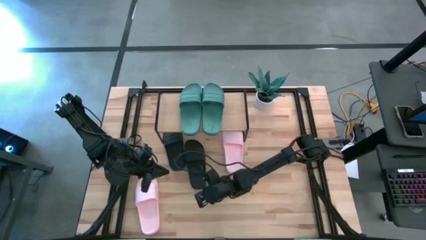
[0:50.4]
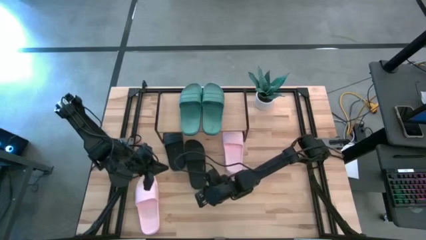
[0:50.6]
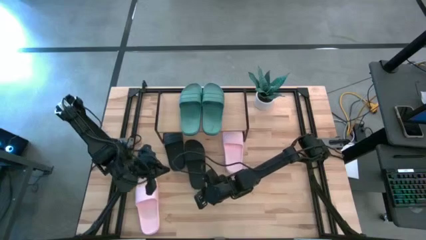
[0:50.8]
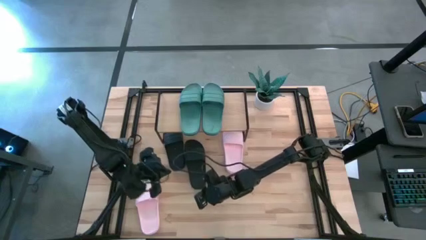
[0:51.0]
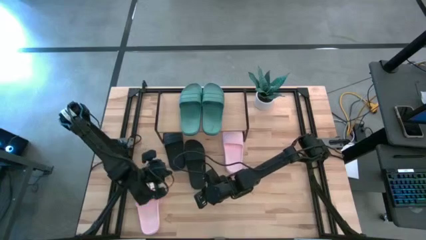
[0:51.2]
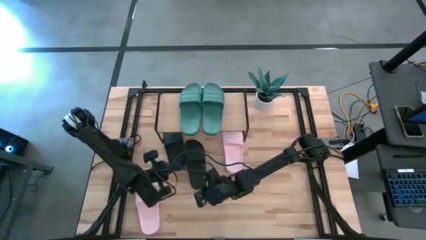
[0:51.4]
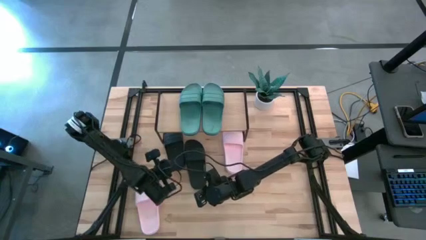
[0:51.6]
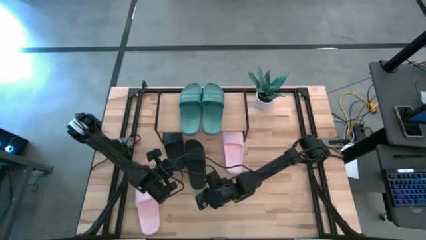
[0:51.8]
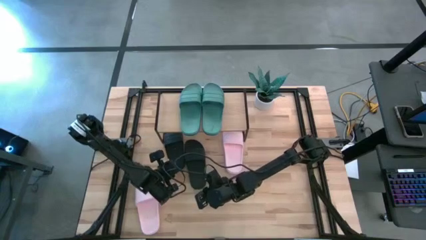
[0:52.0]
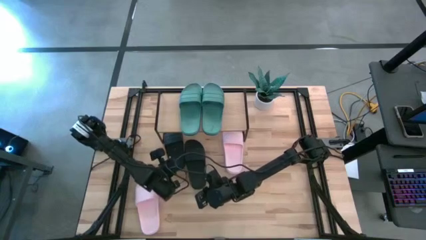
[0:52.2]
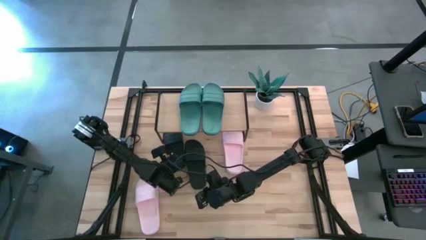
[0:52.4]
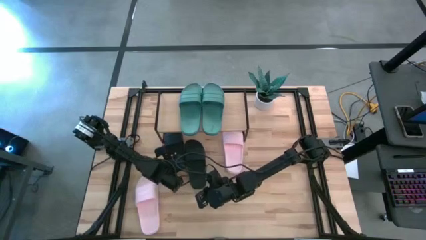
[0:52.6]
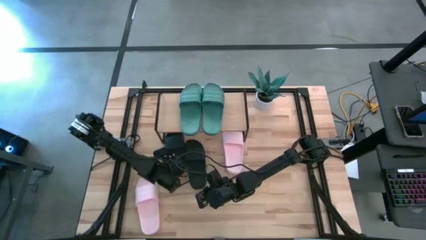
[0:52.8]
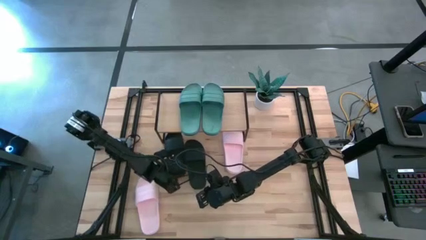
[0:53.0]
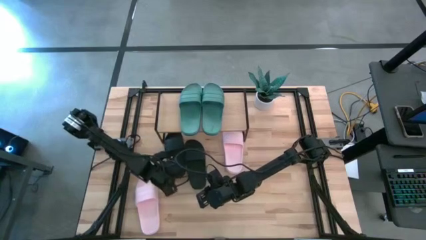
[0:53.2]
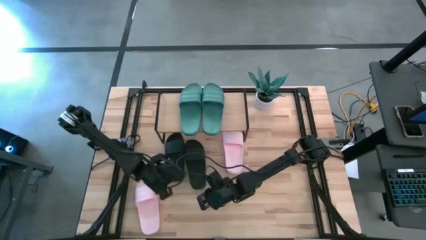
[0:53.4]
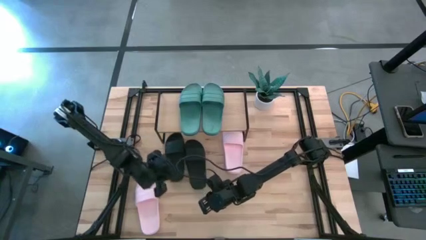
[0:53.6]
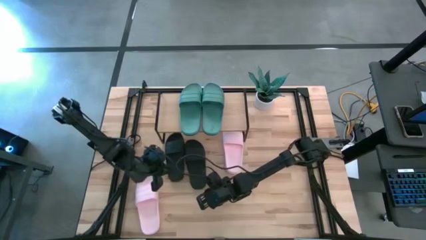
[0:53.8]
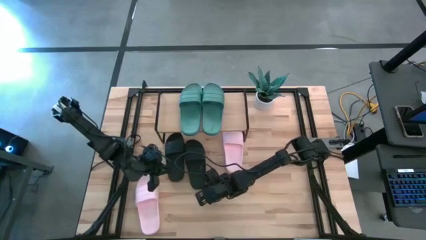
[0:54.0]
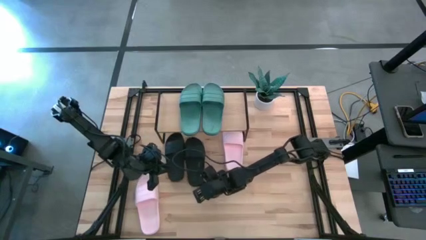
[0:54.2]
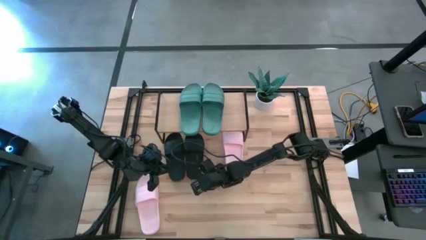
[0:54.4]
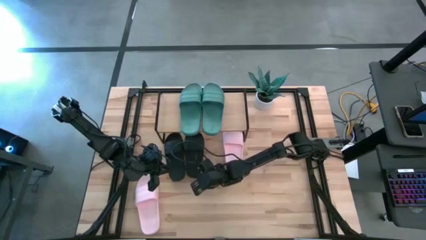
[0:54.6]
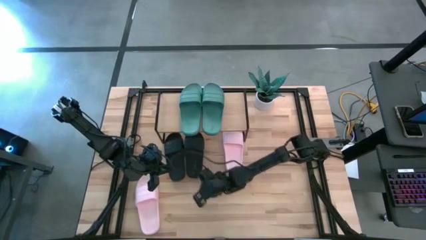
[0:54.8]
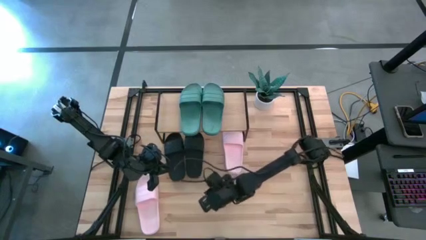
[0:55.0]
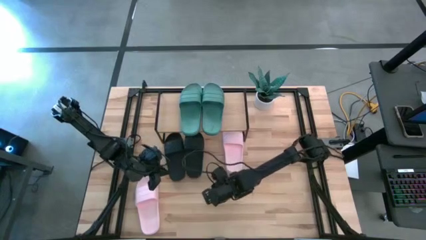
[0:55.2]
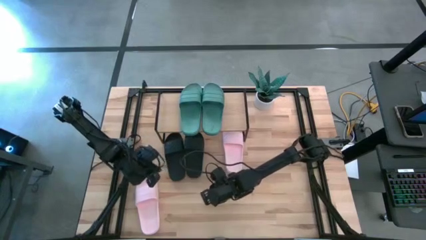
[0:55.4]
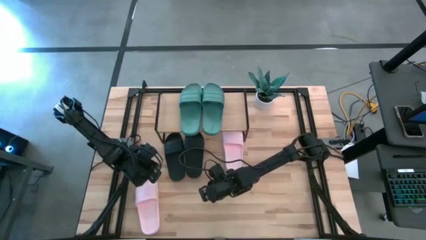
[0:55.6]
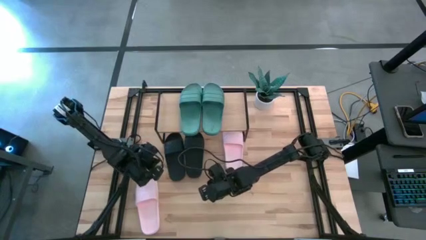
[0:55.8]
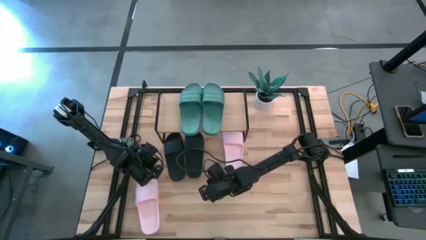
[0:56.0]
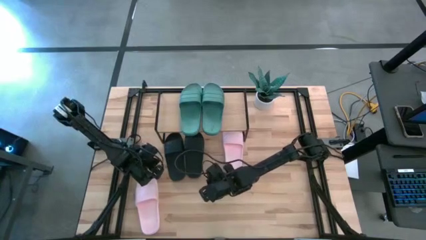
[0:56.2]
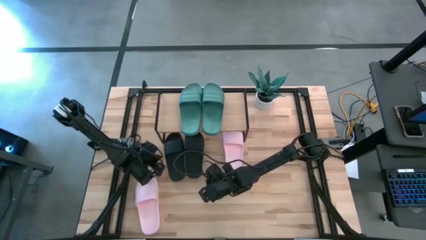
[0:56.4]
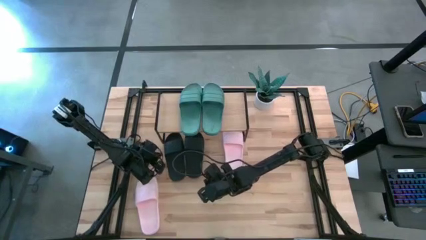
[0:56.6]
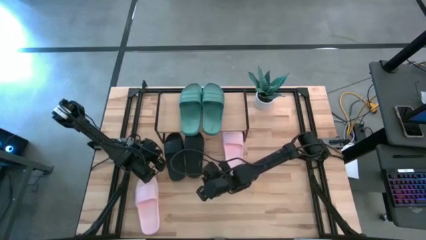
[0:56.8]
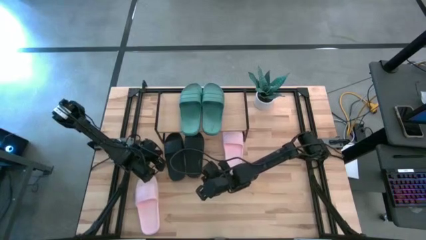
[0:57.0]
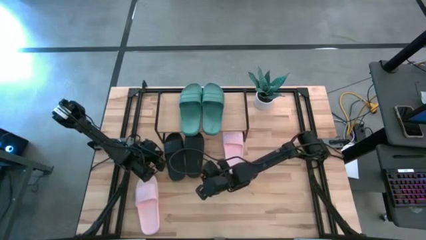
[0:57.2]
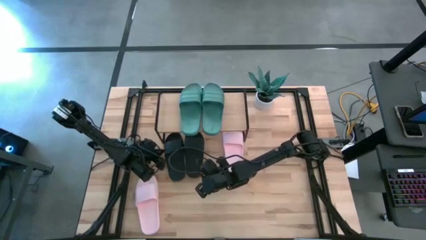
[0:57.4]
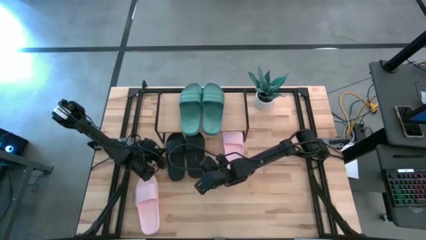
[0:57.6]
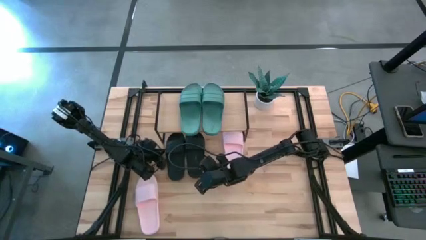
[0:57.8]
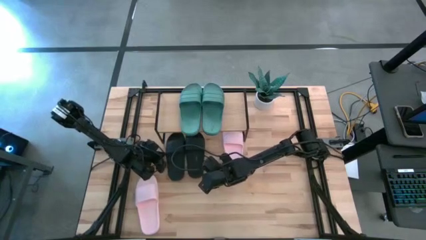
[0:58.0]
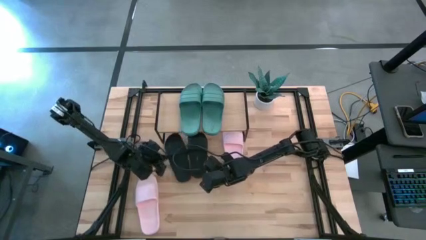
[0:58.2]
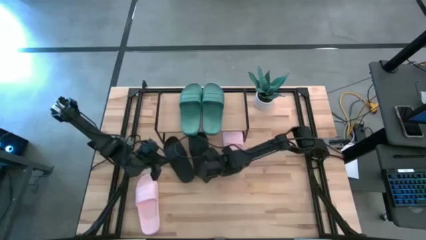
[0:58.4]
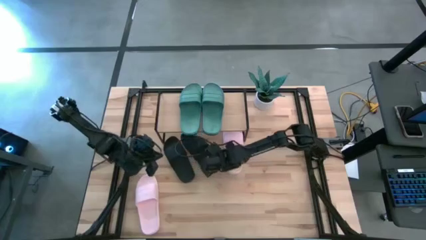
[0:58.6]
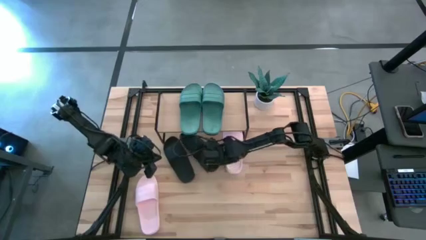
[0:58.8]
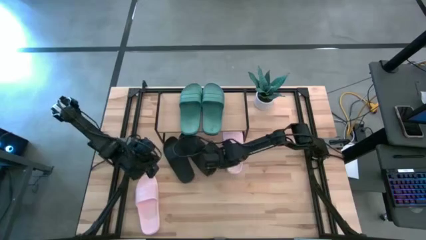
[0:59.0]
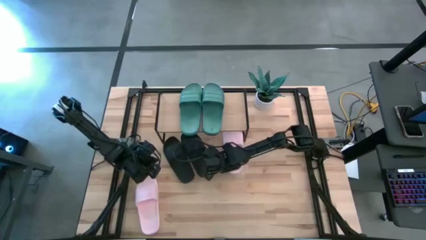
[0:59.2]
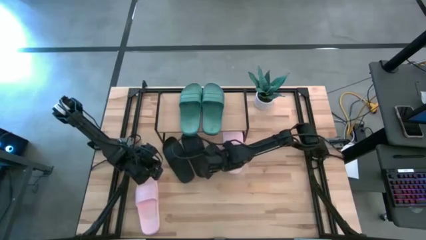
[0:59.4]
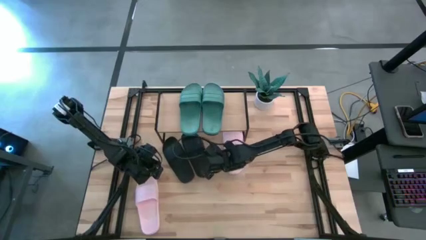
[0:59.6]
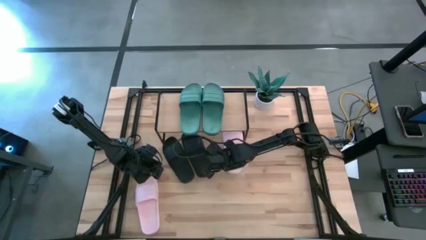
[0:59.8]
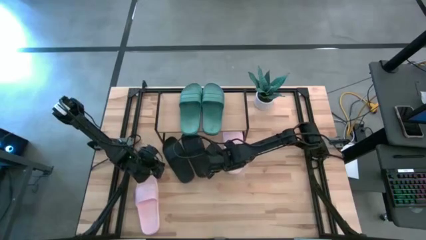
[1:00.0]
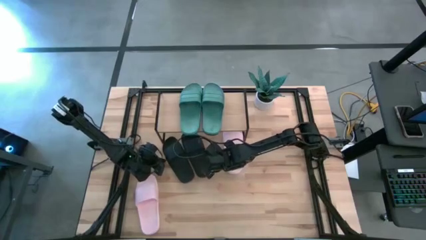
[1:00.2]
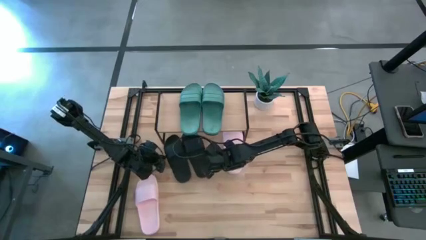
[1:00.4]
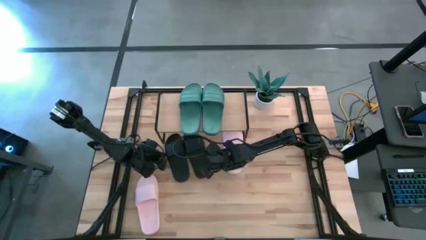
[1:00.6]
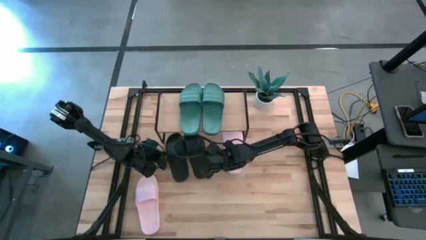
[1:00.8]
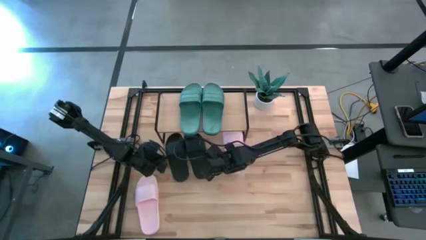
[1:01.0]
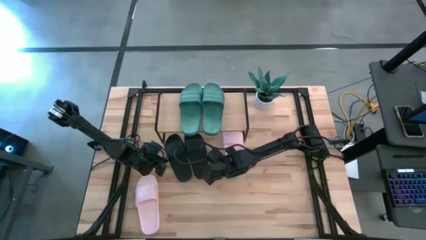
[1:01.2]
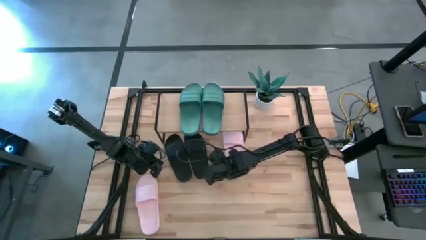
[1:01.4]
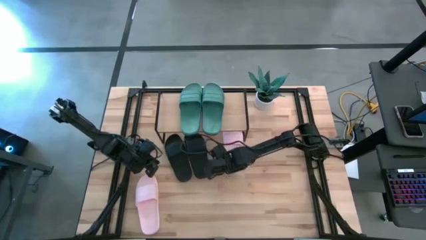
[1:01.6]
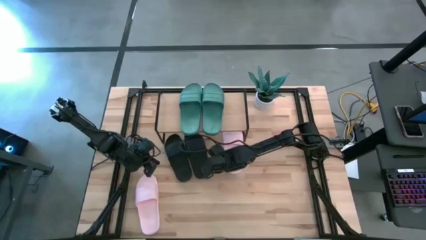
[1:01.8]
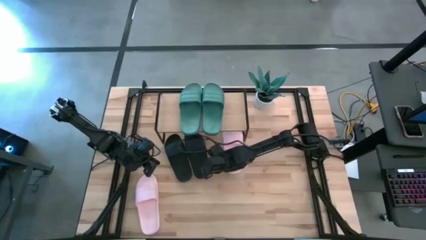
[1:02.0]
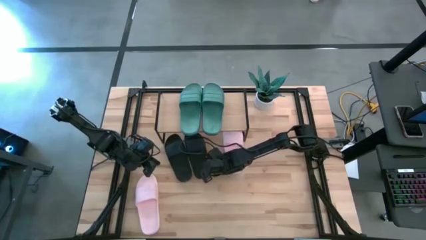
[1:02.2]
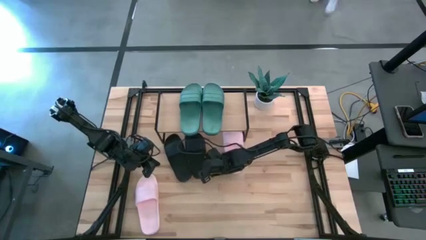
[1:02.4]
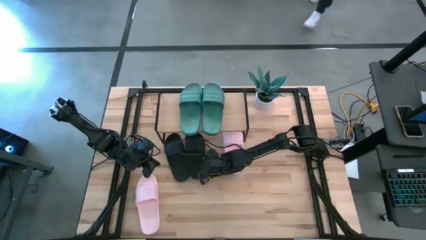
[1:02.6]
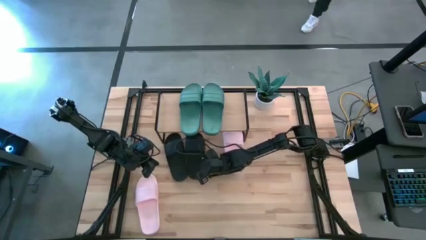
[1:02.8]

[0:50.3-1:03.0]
Task: Pick and place slides into the shelf
Move the black slide under the shelf
